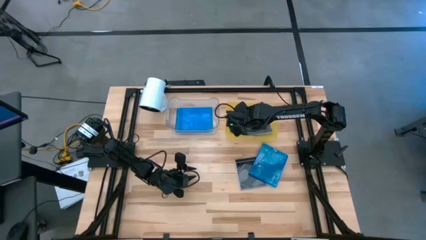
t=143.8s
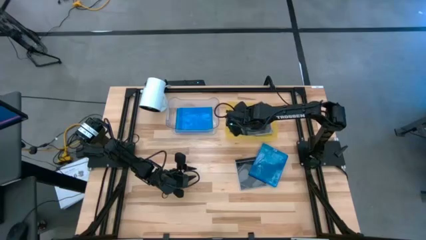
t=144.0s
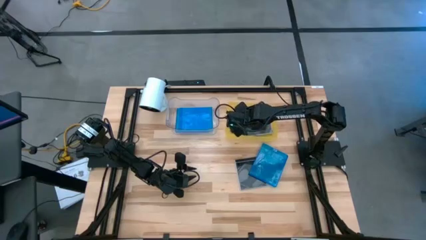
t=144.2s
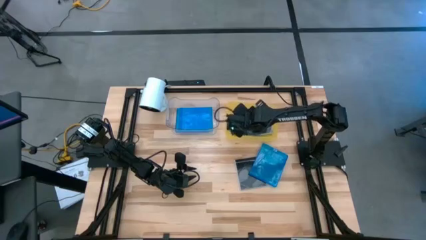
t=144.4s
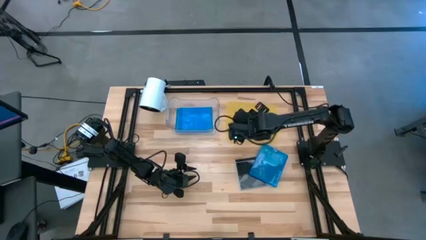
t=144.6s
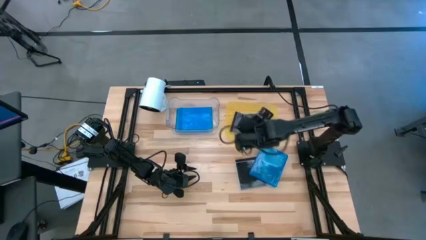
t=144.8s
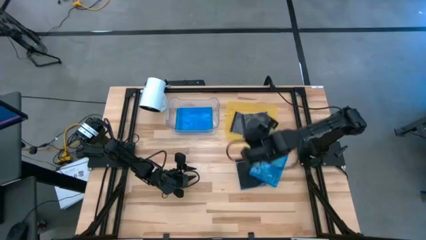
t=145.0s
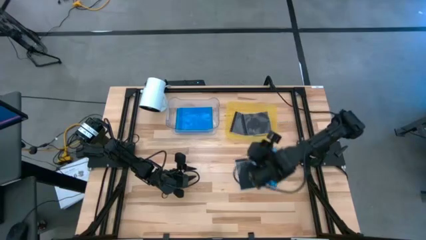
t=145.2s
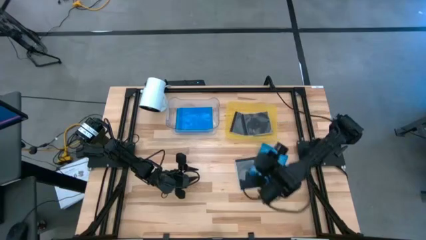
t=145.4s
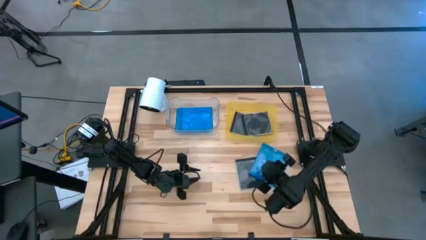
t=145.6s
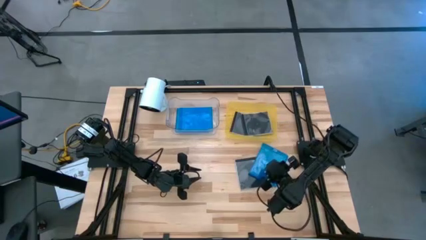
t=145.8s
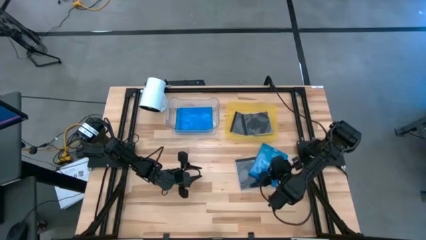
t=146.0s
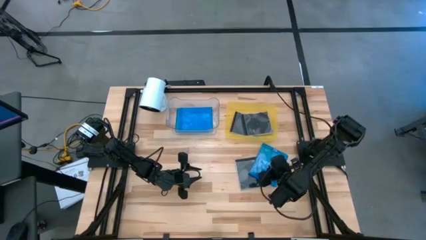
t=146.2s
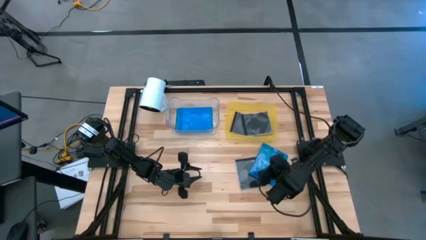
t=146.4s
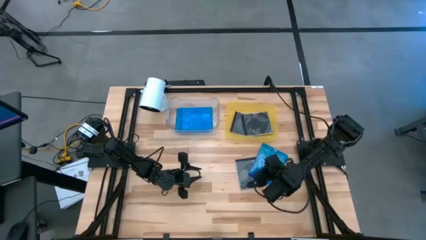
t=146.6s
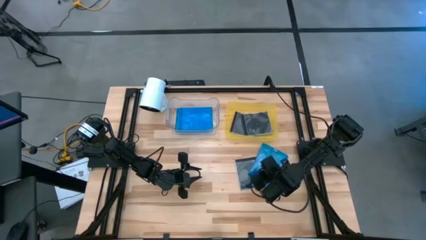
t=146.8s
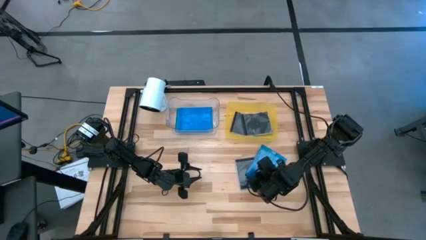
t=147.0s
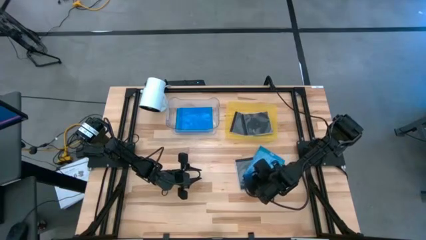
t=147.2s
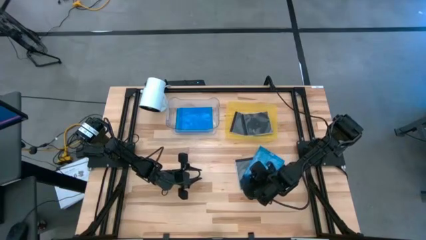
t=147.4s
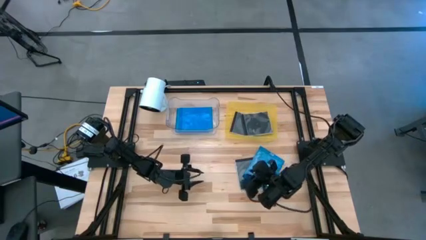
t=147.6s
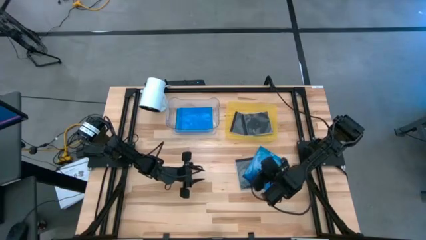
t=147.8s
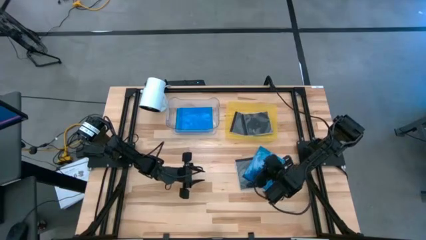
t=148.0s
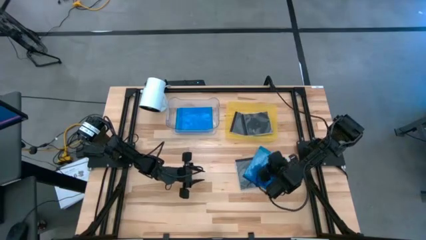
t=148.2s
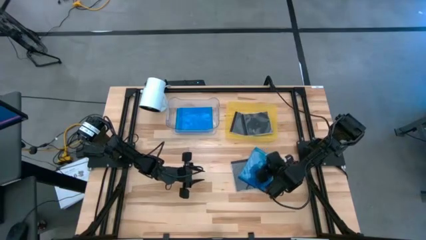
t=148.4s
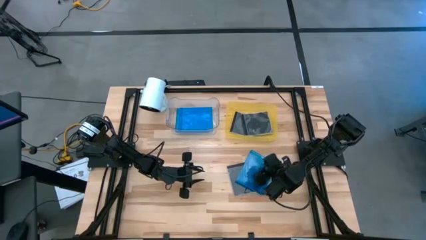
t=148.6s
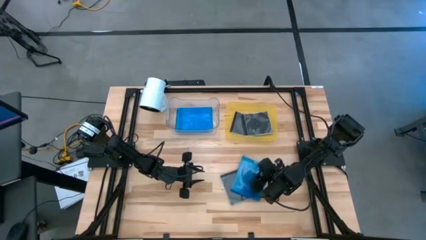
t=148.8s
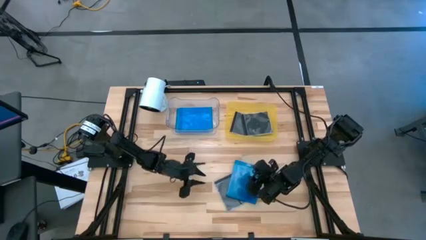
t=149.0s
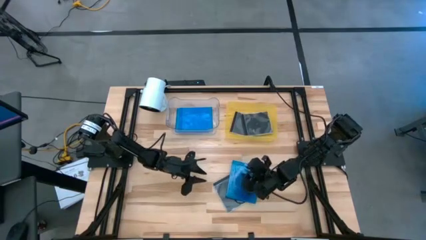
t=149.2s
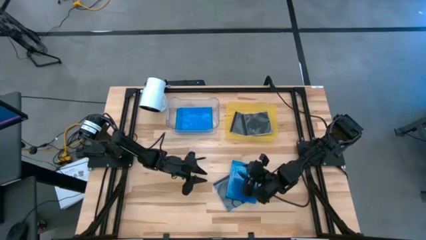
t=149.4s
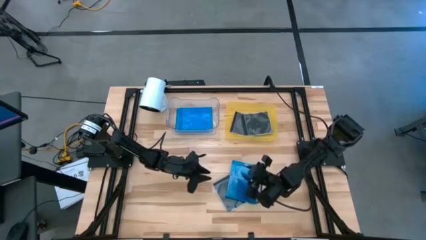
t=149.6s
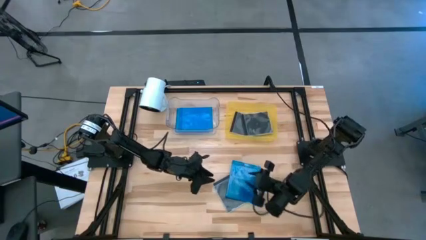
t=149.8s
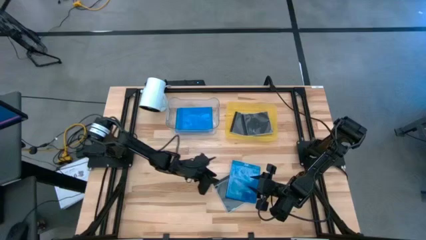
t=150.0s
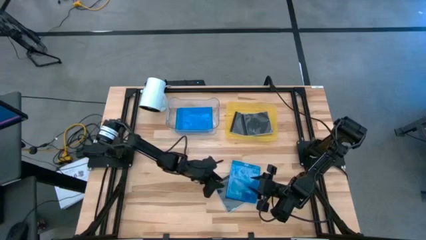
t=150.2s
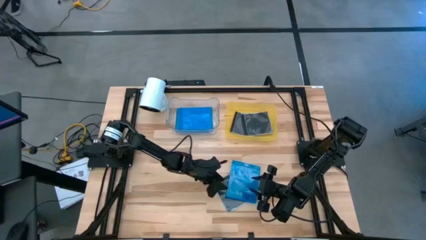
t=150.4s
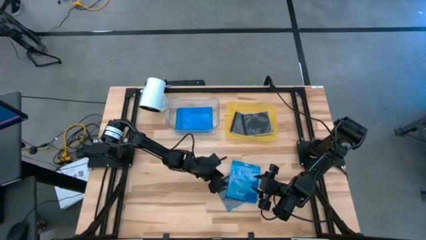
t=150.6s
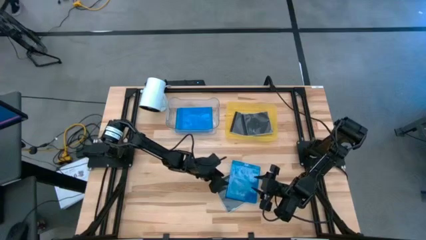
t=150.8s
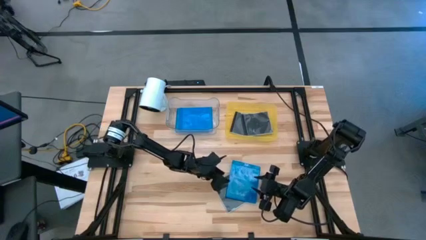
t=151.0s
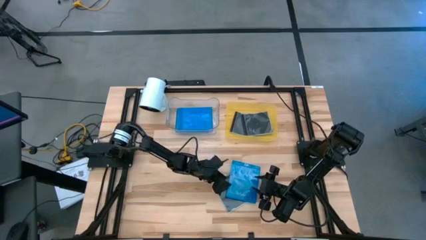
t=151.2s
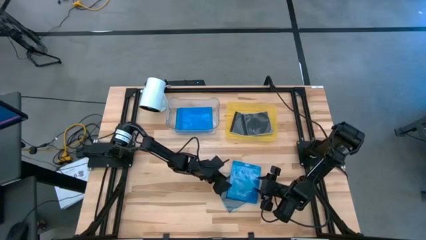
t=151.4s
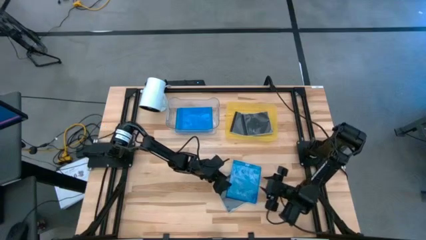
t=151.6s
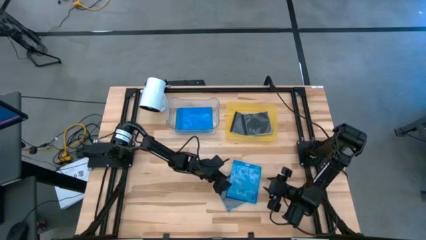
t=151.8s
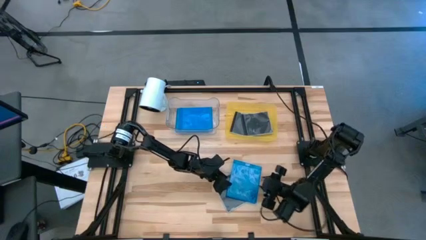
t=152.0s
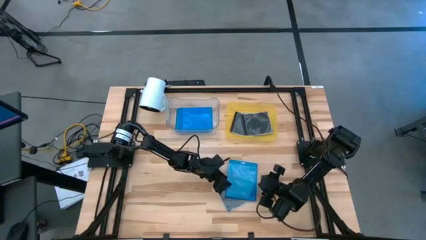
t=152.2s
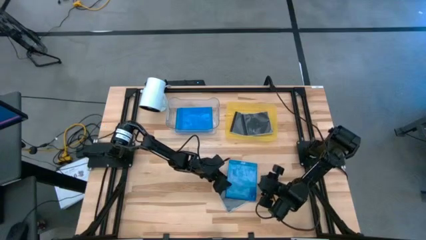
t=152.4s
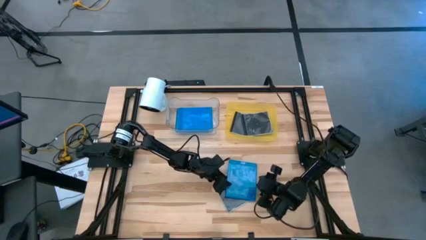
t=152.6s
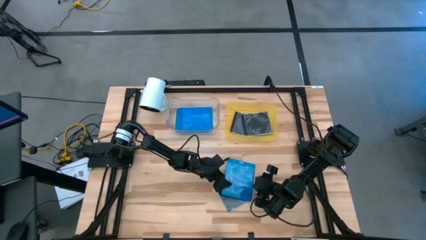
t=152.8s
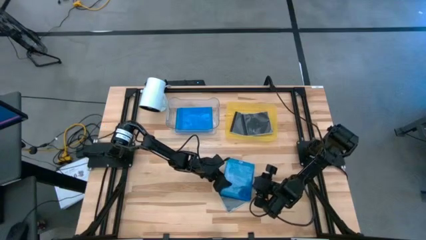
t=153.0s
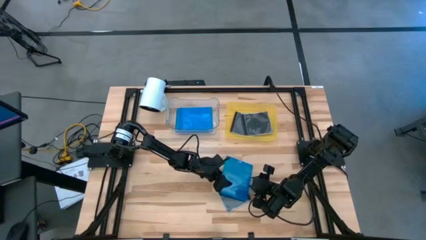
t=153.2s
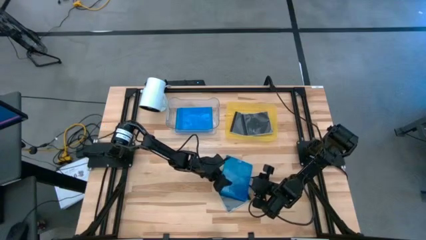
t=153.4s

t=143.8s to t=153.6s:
Task: Pick & place jewel cases by type
Put the blue CD case into the transparent bin

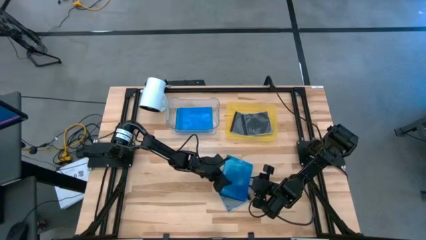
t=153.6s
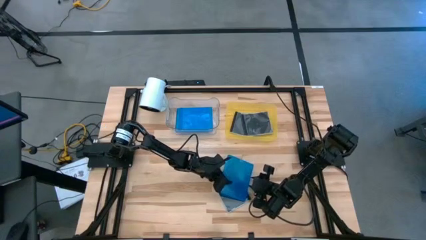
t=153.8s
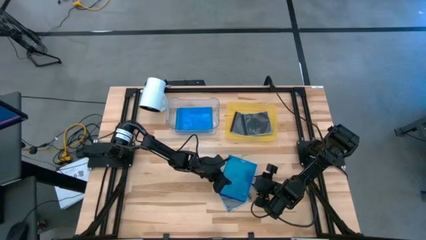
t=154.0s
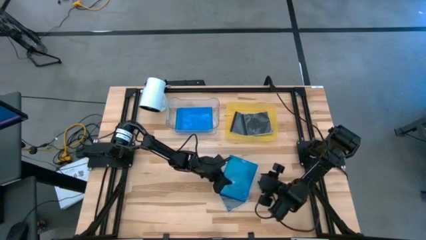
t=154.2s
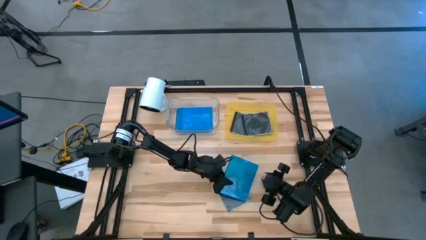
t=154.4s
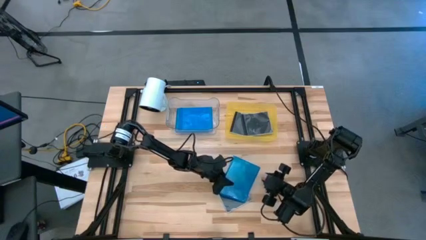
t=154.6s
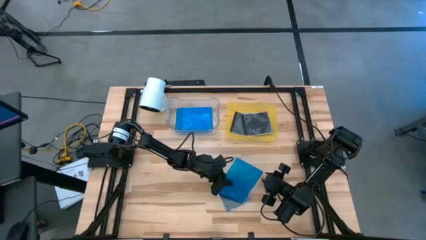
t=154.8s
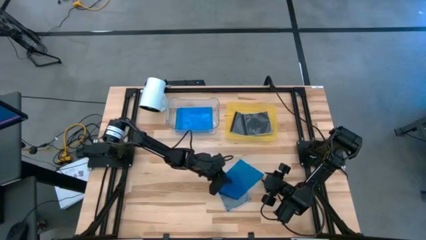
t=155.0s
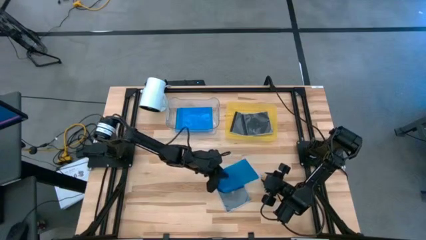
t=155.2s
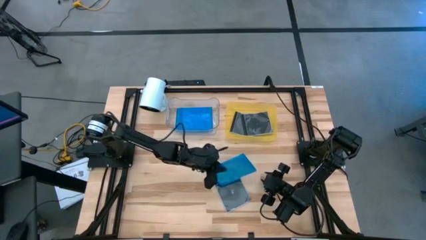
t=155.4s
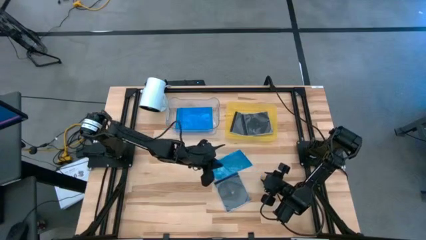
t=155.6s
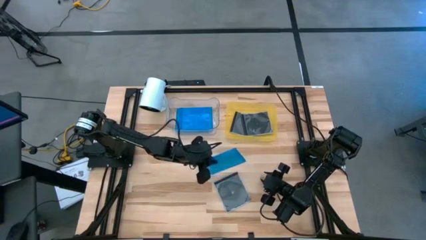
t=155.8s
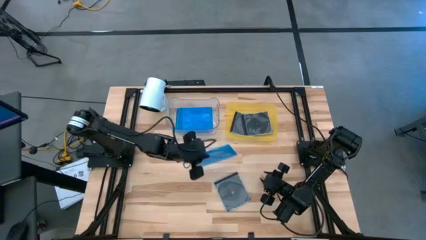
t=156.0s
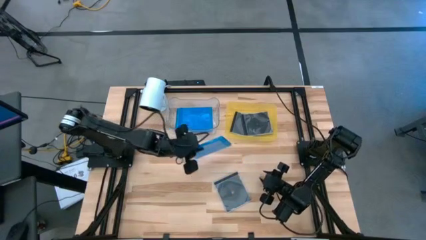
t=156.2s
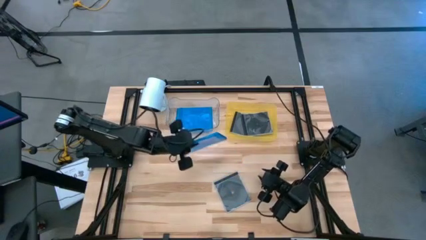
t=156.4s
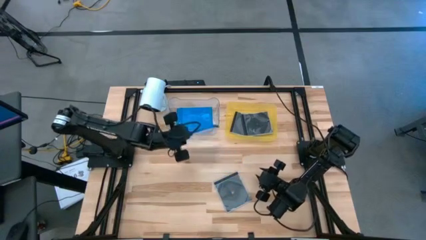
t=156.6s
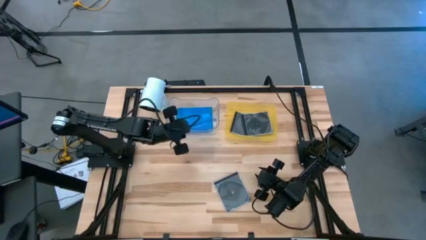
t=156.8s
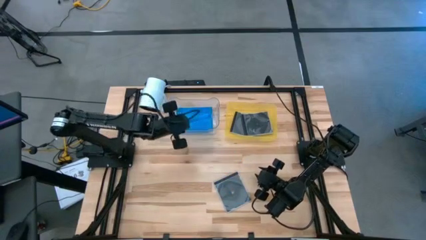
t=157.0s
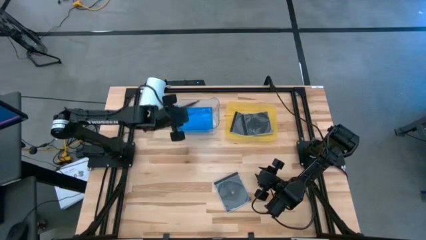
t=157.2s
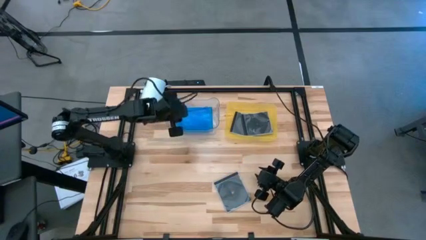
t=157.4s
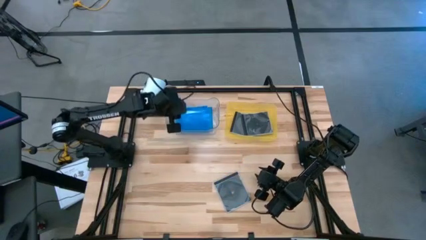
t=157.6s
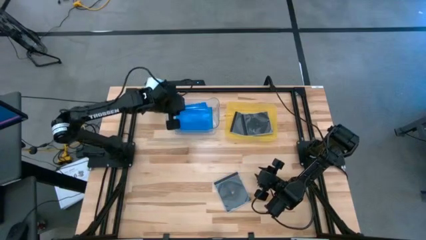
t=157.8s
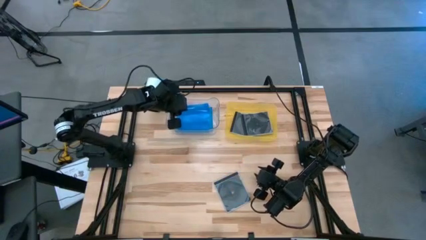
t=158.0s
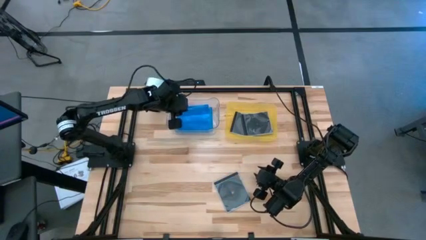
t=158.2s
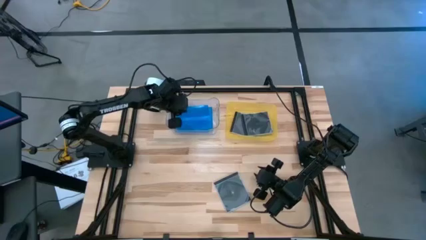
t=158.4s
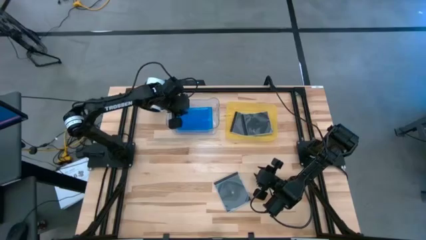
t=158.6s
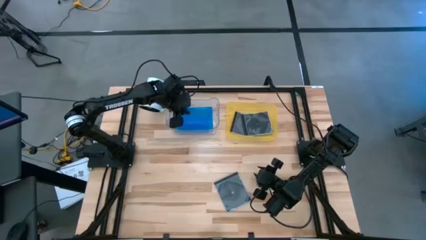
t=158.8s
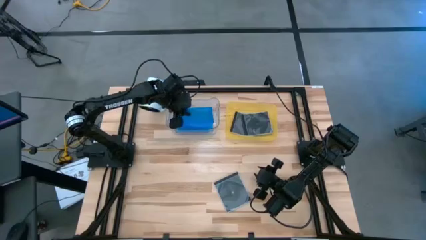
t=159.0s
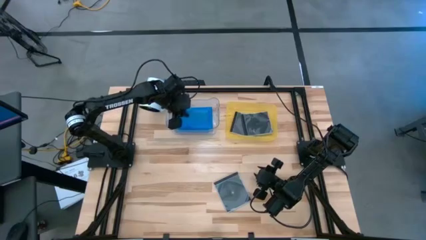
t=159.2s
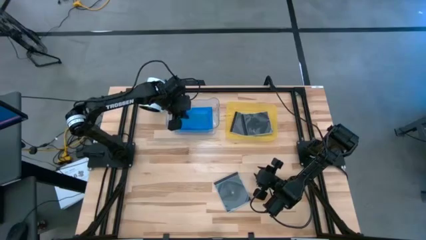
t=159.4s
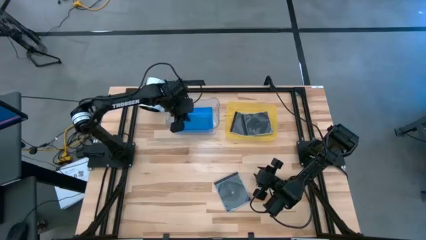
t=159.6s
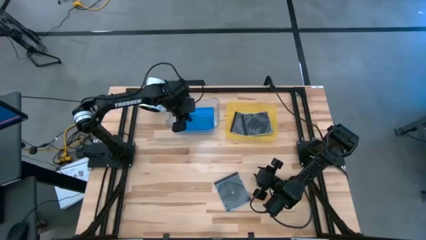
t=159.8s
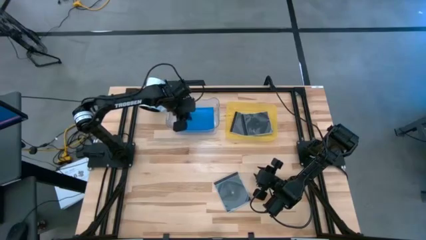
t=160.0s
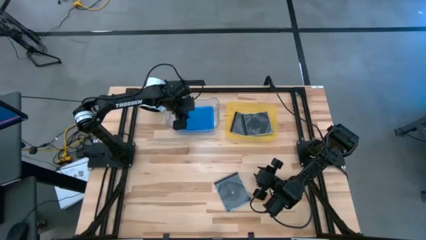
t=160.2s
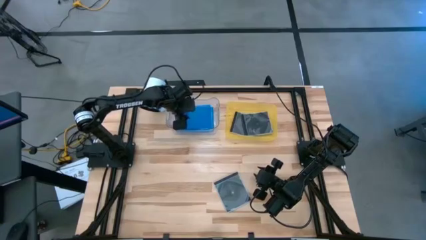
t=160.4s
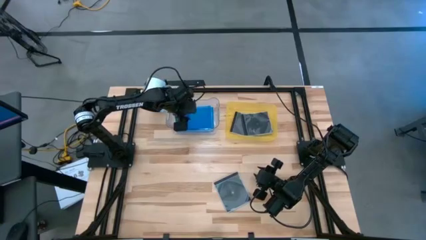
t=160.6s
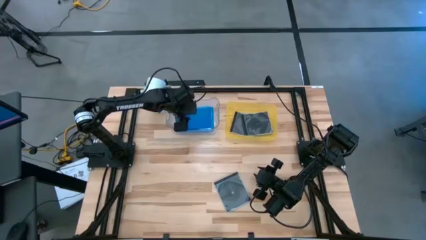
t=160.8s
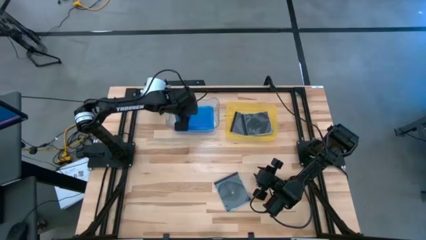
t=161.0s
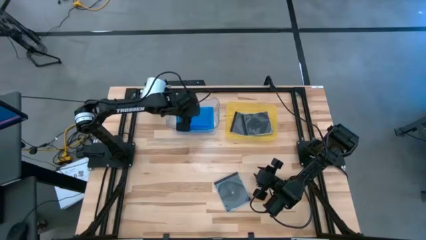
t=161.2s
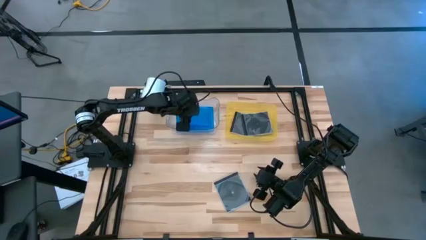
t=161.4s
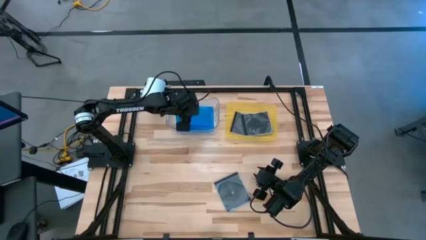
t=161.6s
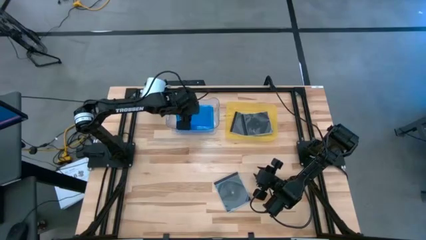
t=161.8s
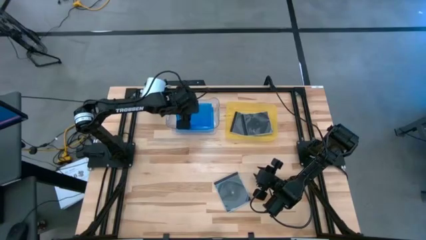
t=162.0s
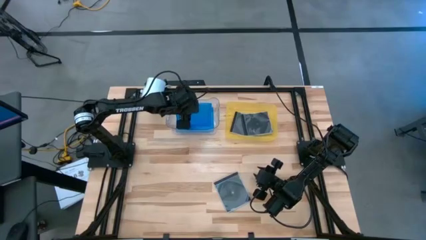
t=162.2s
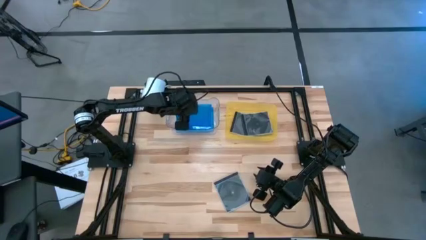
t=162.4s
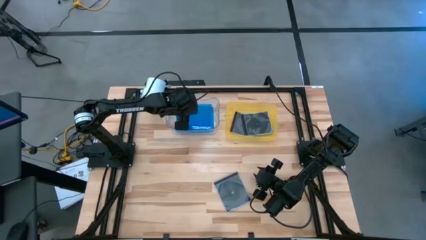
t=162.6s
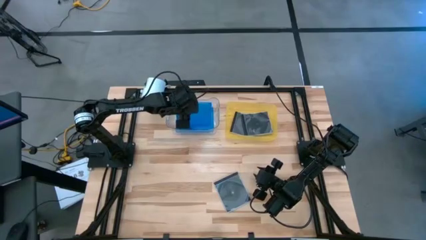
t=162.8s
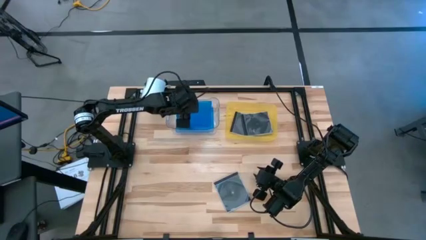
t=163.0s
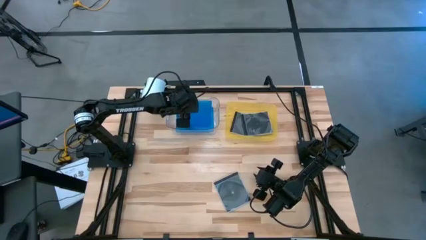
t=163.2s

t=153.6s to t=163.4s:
Put the blue CD case into the transparent bin
